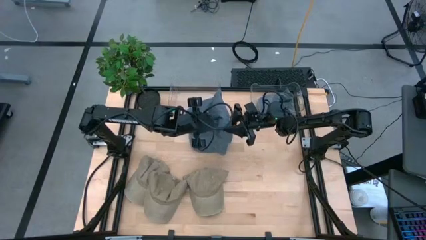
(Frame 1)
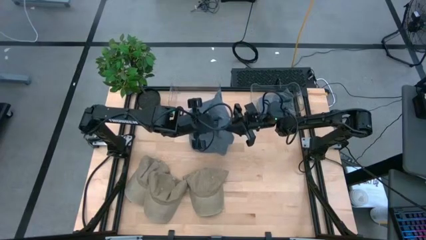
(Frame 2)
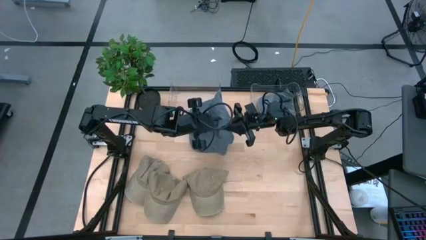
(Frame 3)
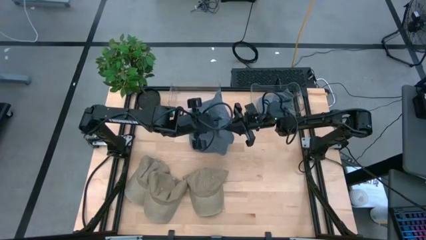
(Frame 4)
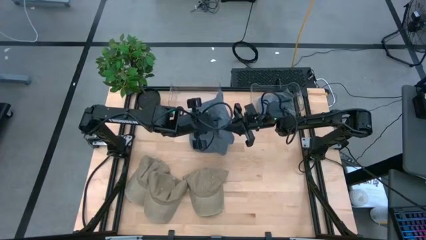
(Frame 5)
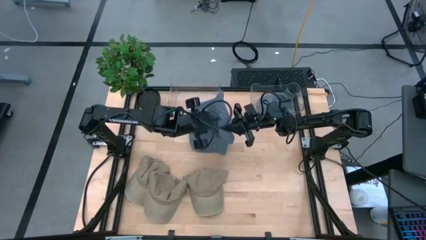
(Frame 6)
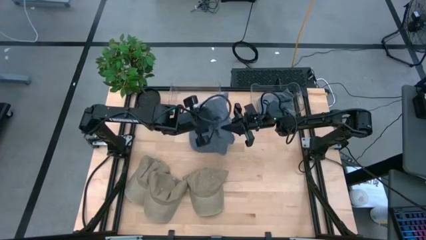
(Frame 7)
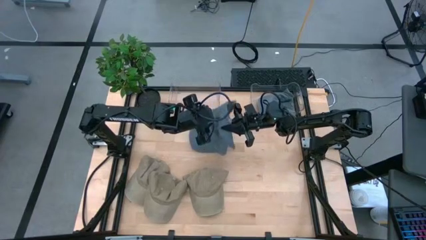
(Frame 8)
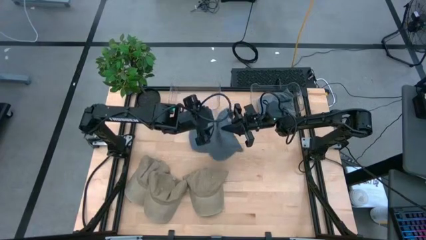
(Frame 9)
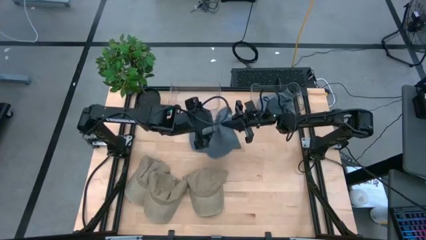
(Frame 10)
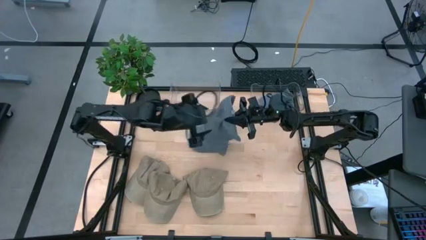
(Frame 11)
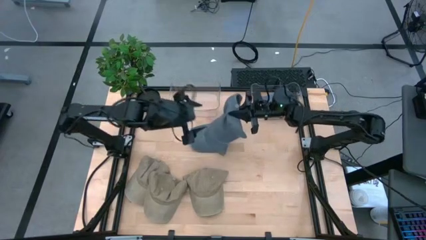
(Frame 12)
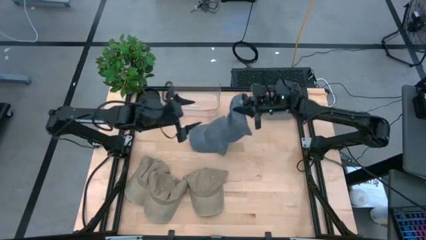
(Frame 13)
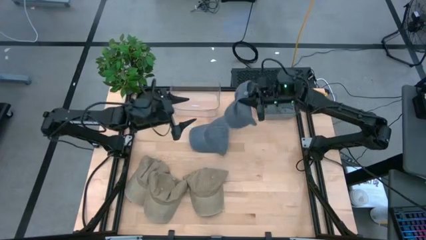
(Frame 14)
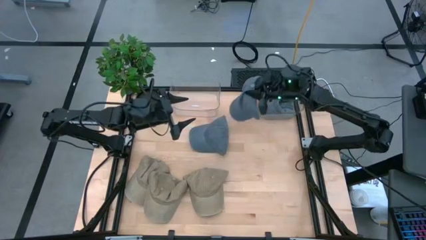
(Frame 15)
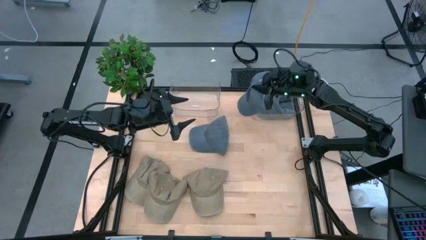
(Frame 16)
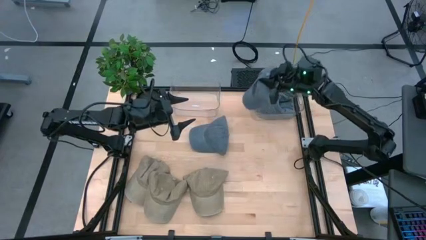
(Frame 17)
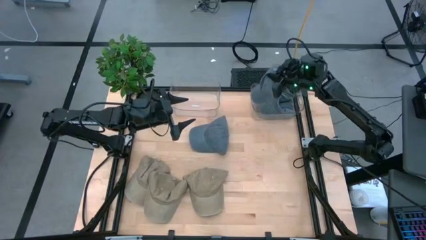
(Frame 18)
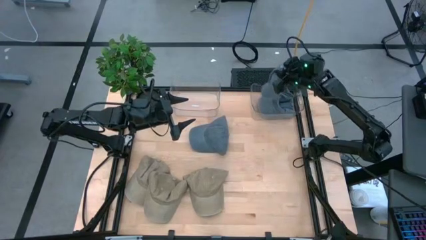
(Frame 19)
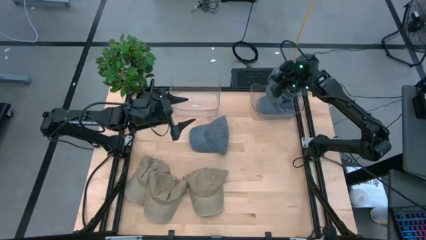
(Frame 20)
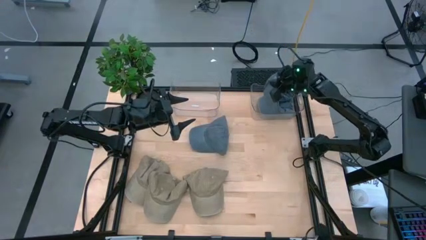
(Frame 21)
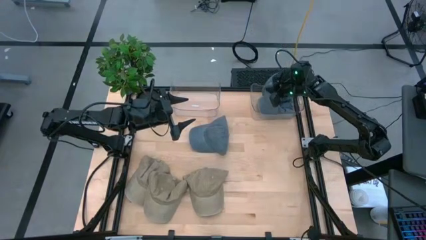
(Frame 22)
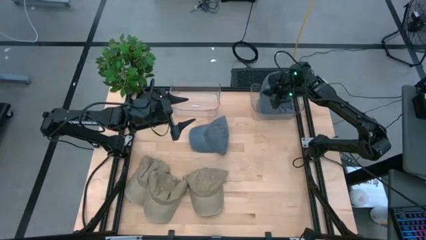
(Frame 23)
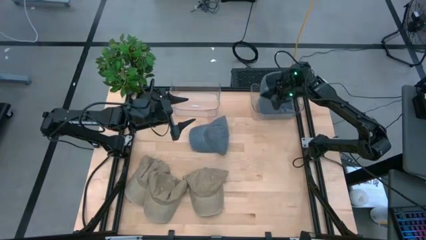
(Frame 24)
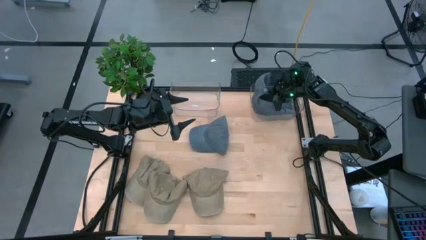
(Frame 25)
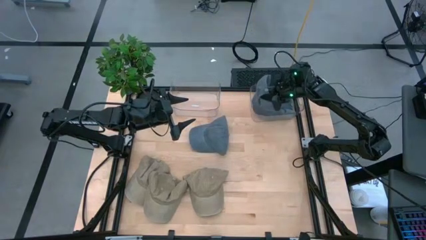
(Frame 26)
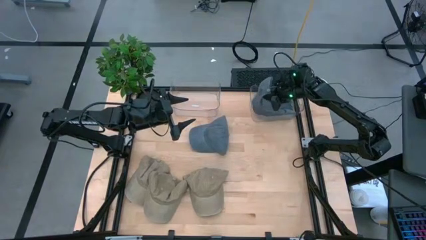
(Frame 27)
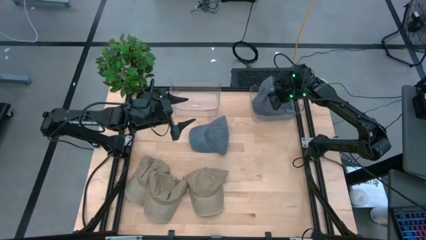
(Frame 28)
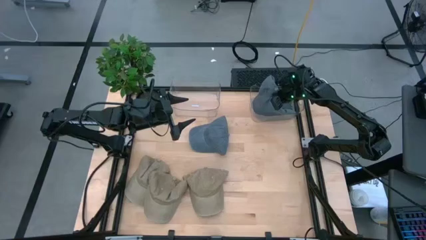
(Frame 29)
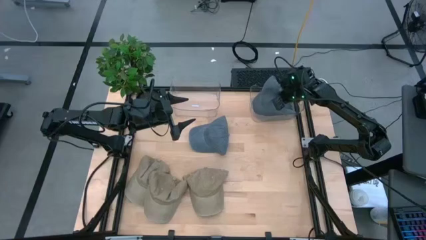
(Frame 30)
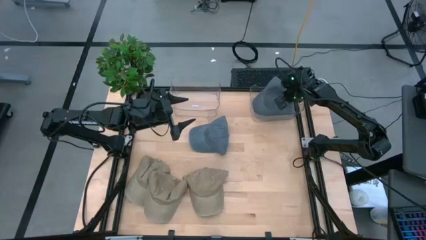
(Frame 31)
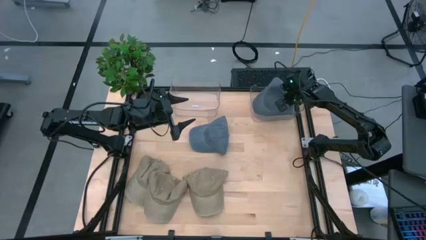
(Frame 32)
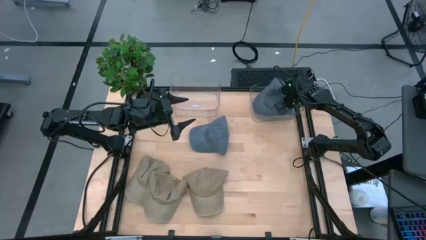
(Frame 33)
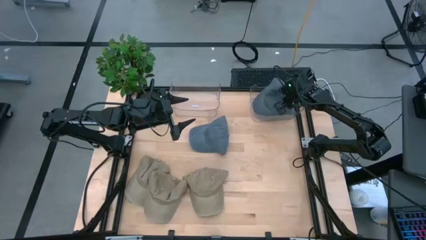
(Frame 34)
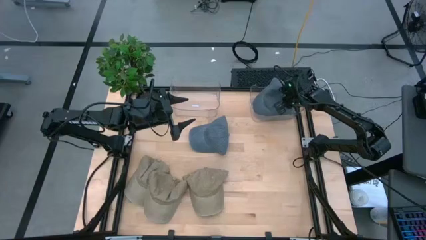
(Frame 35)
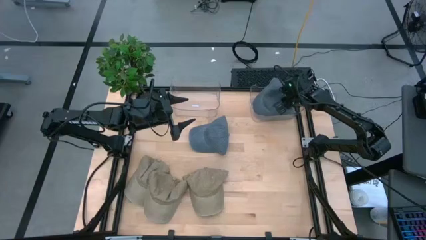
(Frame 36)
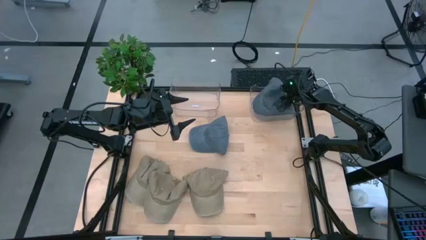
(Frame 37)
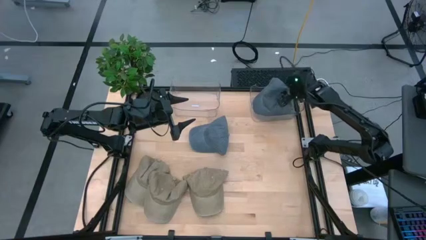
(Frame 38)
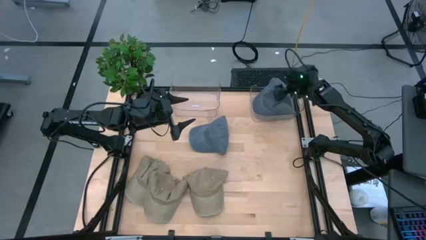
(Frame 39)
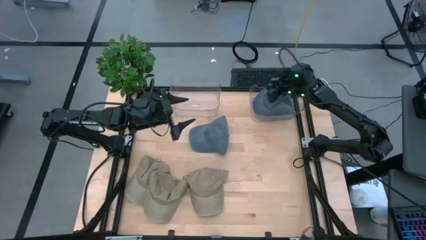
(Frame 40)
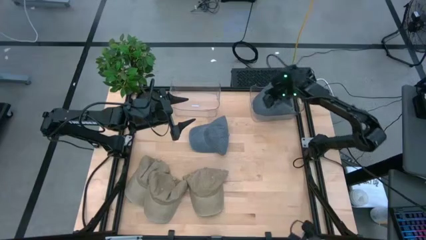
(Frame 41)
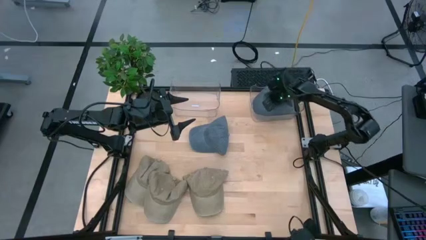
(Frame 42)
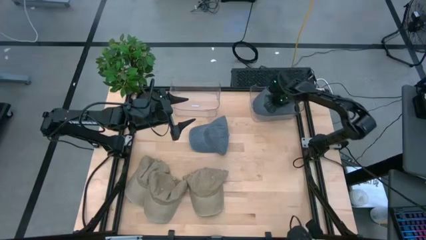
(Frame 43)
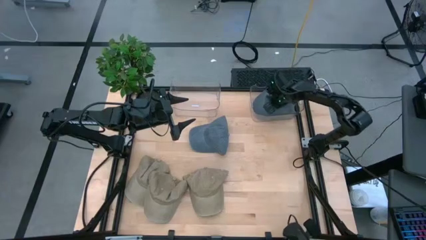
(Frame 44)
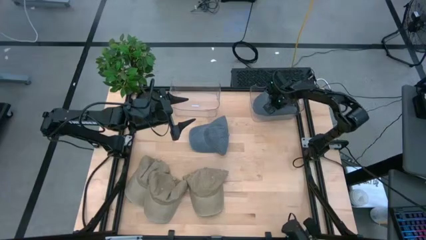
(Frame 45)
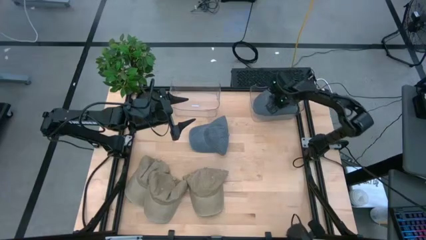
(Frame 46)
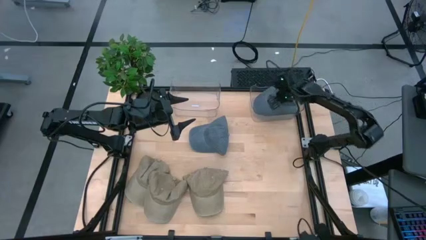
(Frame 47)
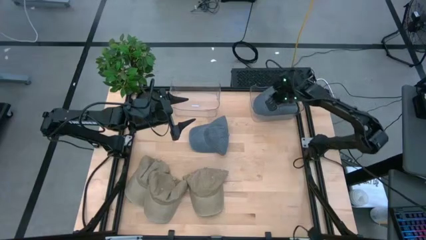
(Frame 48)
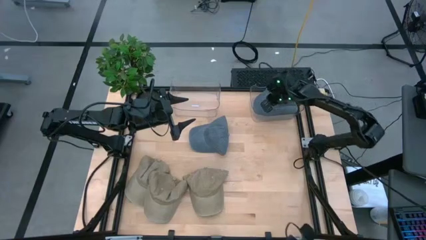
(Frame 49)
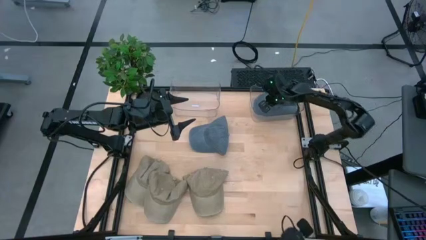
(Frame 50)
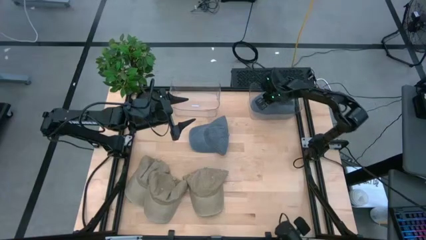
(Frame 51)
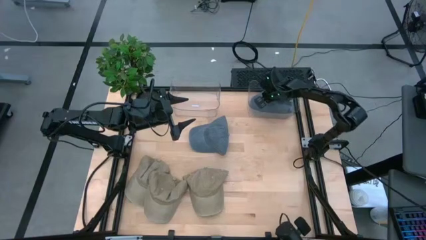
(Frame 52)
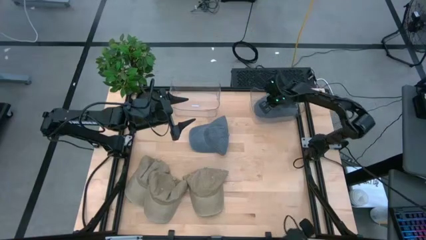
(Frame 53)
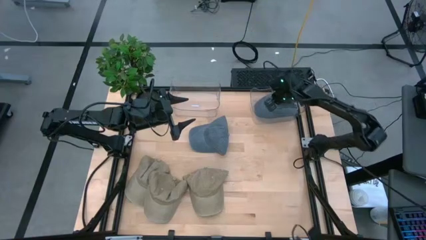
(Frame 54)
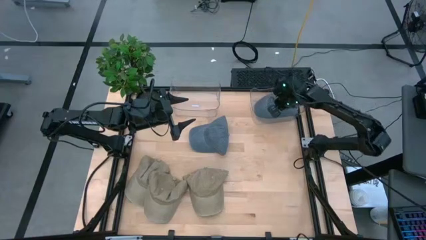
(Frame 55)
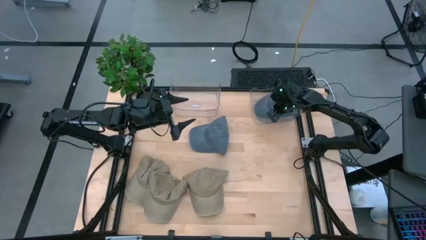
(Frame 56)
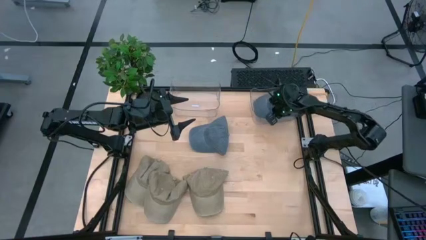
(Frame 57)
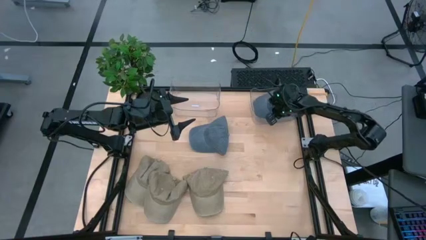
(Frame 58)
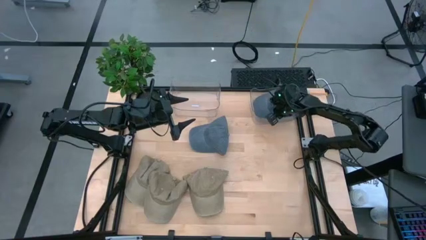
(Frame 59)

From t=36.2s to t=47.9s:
Task: Pick & Place hat
Put the left blue cap into the right transparent bin
